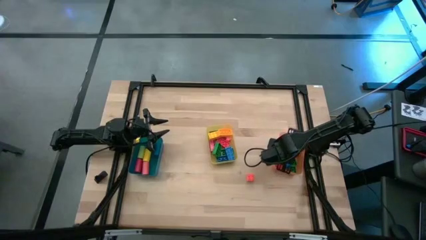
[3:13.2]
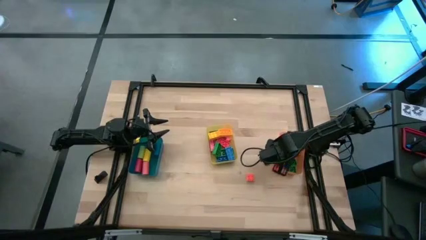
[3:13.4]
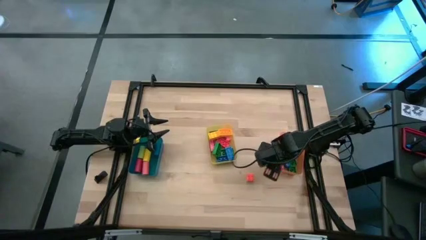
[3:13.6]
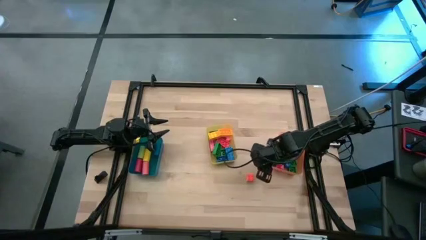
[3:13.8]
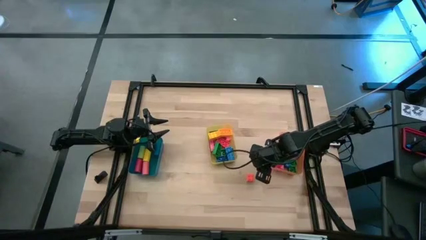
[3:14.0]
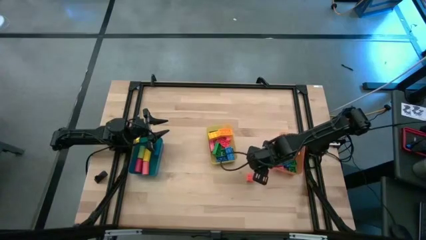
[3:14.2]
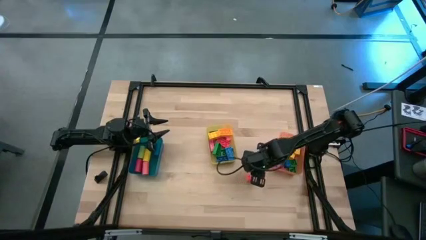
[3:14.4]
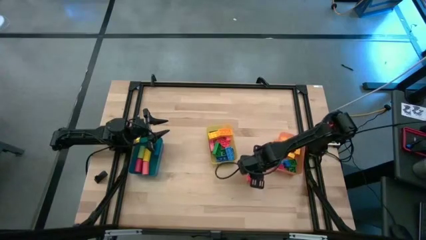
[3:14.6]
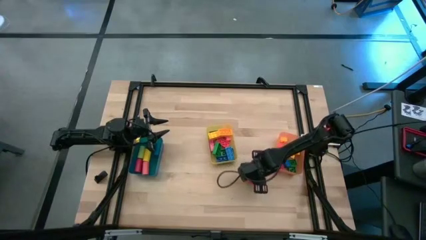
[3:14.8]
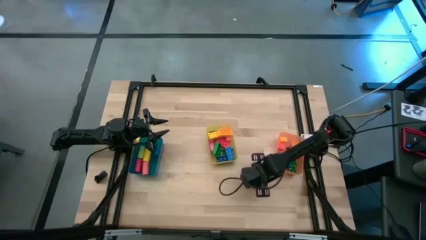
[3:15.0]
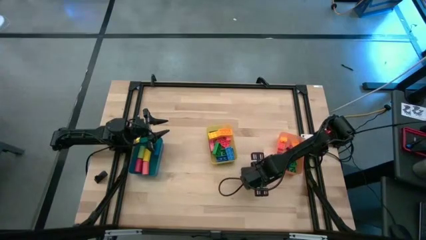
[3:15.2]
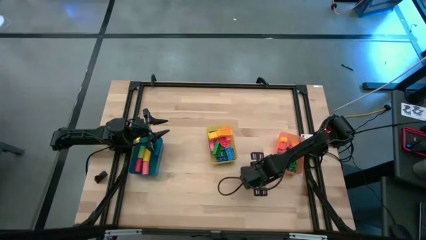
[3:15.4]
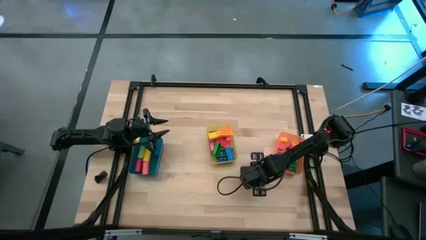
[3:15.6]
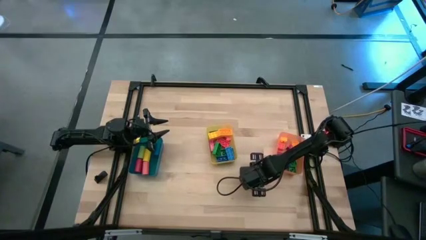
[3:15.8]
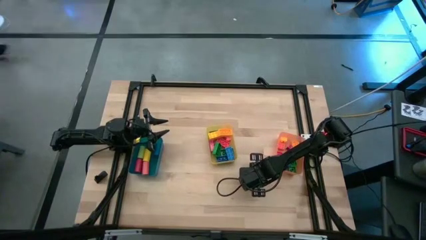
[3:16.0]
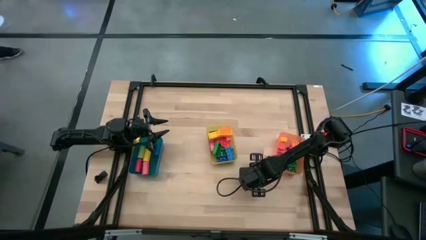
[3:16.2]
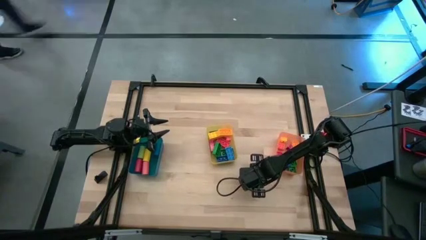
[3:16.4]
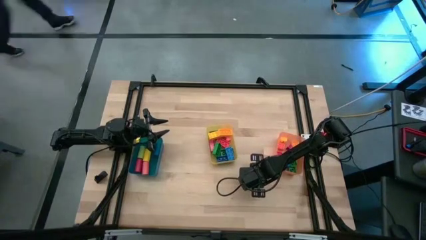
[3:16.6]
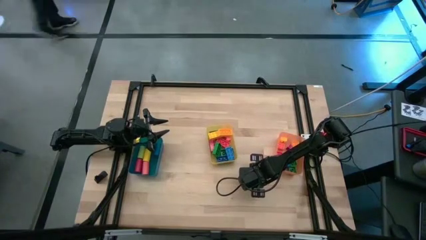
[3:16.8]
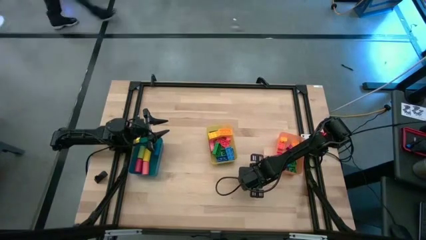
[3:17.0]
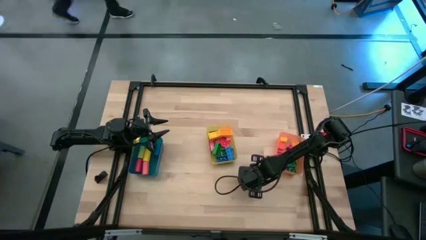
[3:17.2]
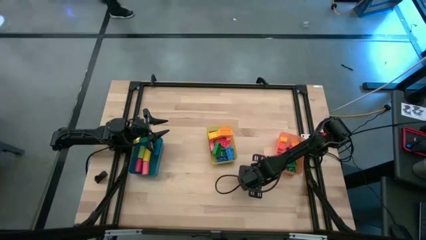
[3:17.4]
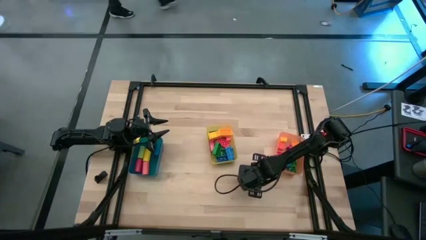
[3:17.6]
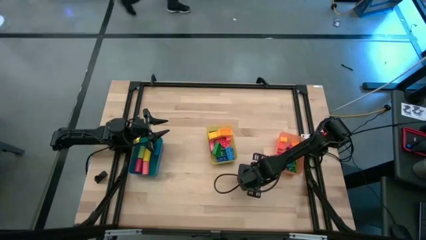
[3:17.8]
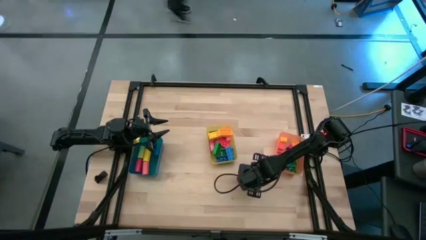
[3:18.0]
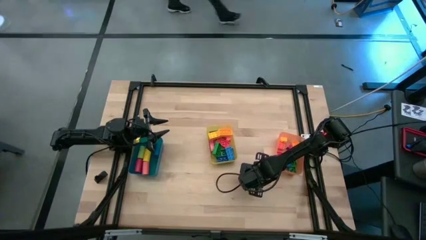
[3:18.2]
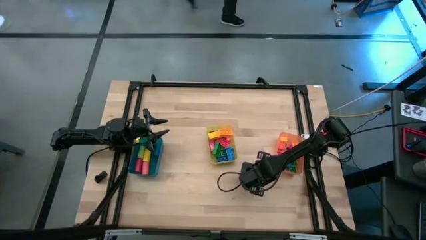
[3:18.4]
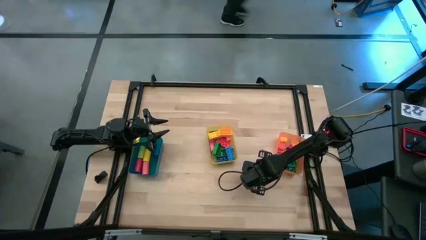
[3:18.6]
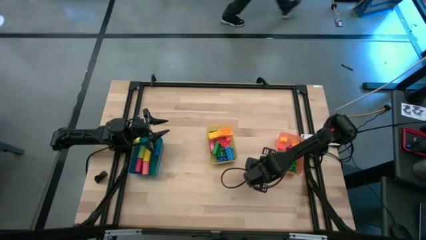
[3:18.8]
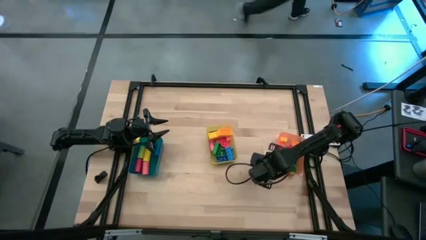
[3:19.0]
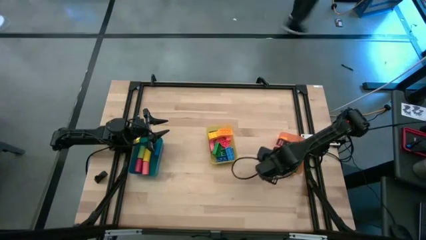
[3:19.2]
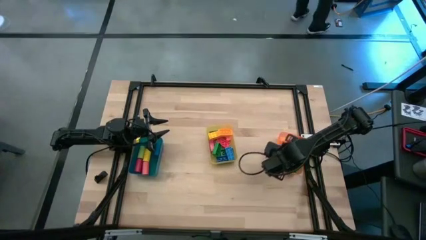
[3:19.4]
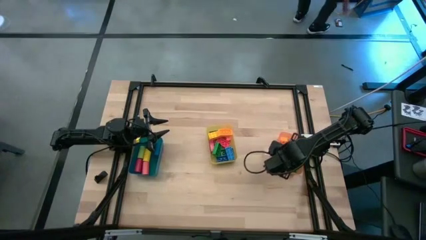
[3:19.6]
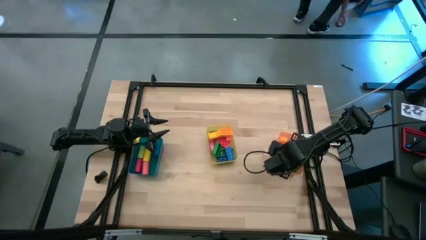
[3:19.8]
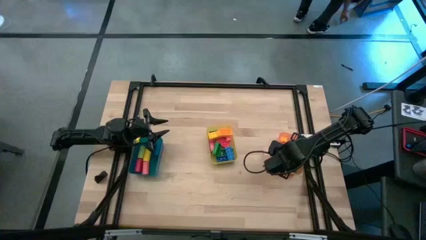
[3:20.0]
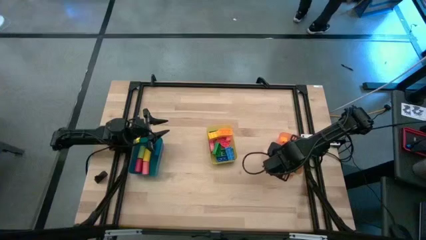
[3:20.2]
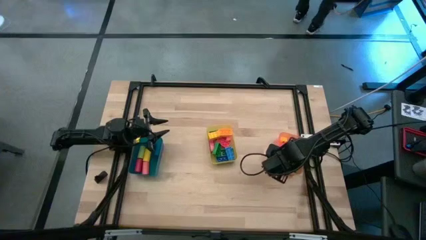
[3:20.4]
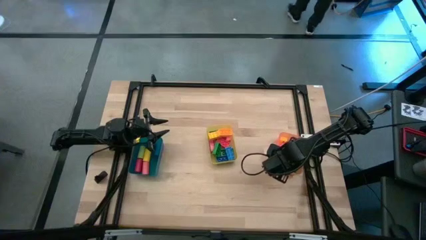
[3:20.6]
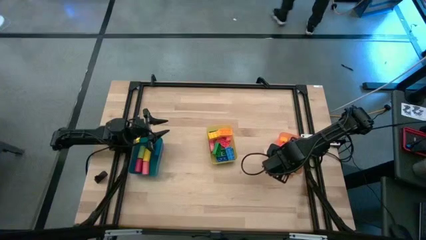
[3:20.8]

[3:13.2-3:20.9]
Task: Sort blocks by size
Put the orange 4 stud game piece into the orange bin

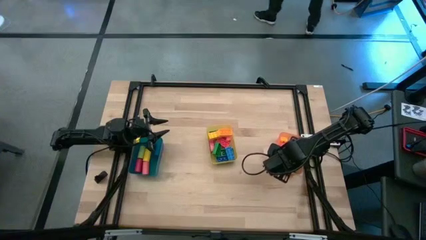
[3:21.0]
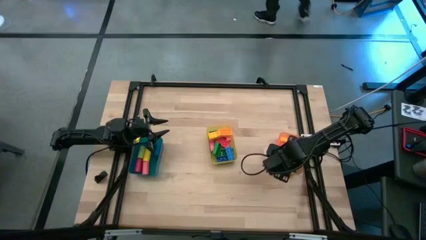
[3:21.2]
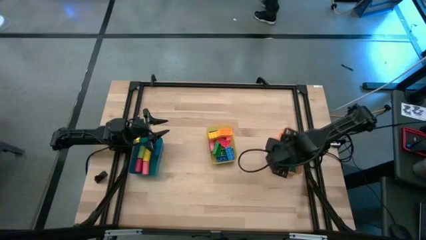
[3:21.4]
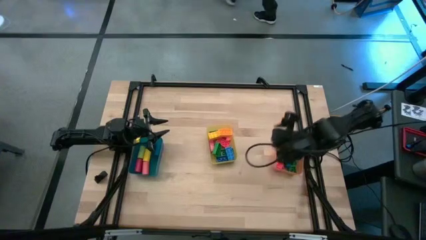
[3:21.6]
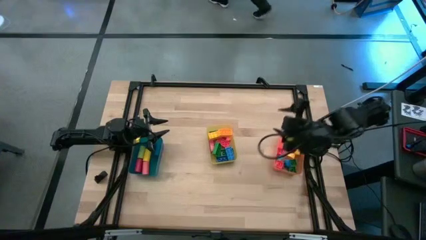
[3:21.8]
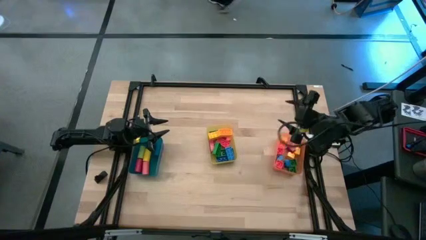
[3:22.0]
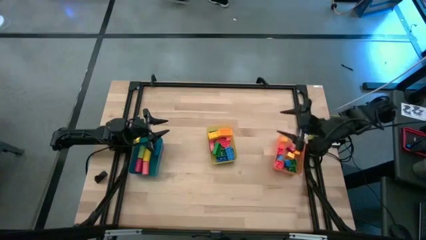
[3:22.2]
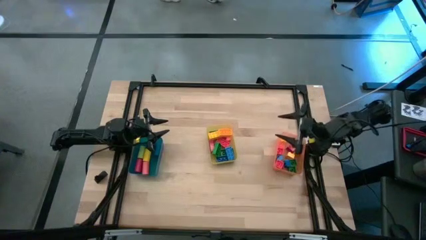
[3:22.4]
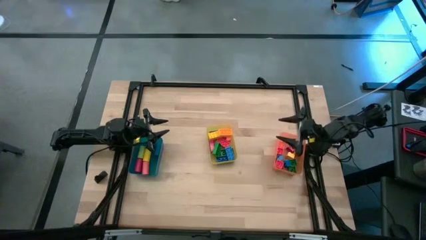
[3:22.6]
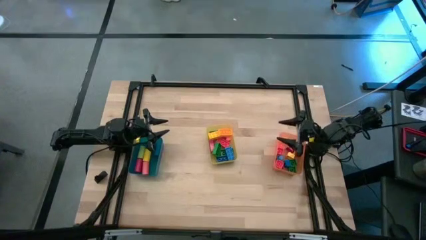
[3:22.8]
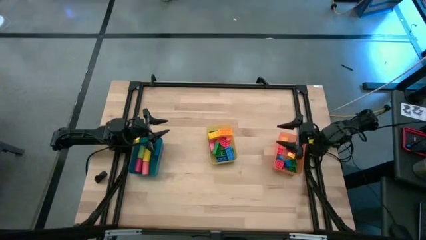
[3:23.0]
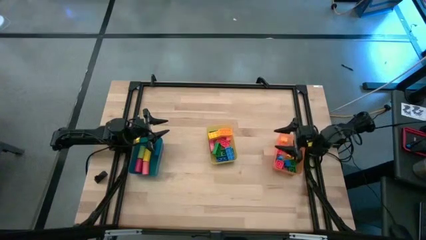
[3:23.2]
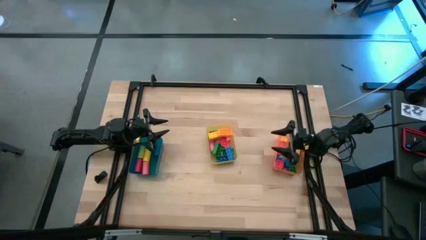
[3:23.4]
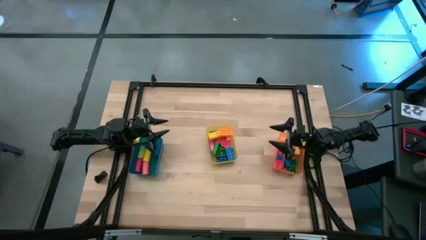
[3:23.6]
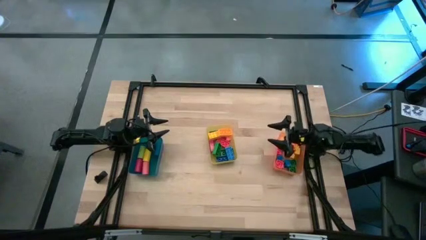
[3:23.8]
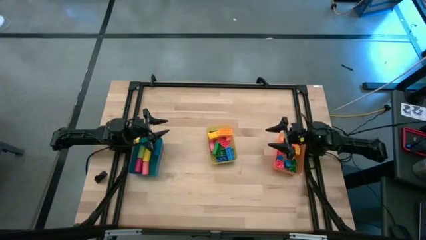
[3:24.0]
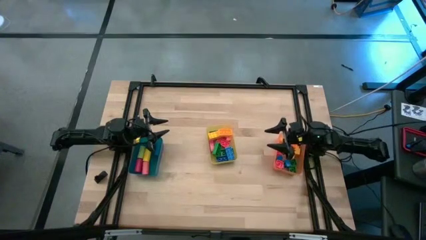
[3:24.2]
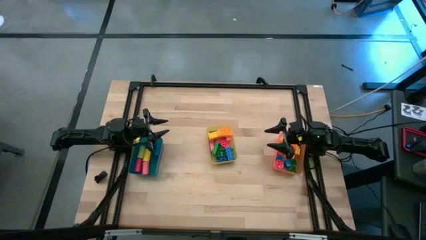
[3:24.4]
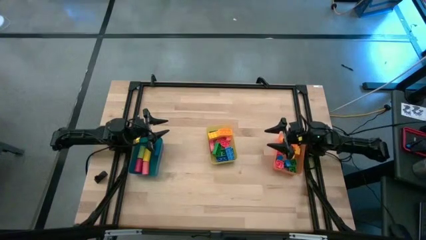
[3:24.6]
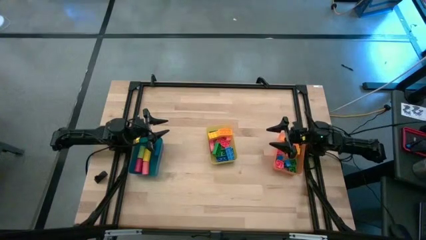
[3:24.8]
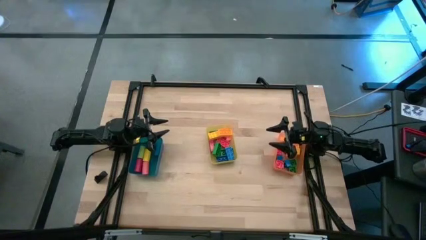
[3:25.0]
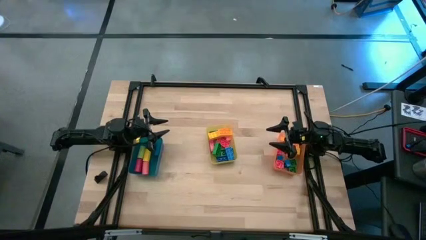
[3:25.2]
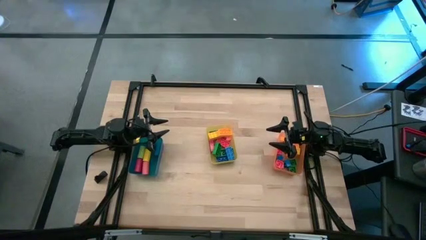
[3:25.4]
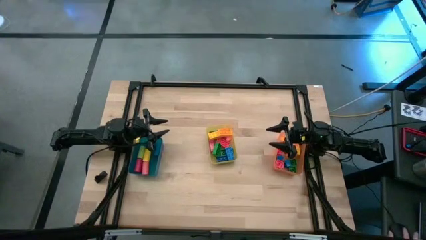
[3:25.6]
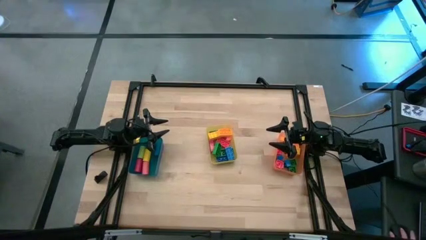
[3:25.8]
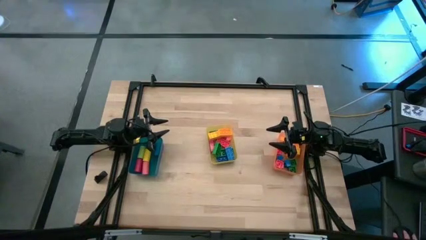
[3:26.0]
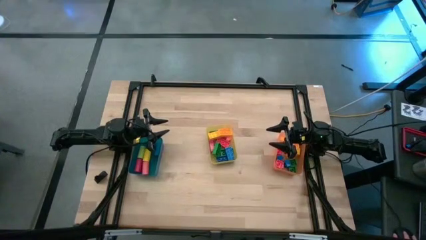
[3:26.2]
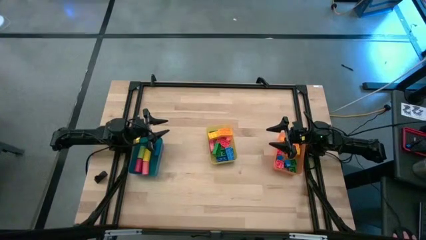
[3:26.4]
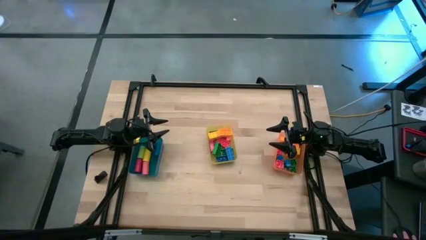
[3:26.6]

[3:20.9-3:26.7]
Return to Home Position
